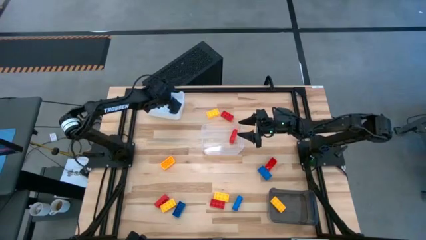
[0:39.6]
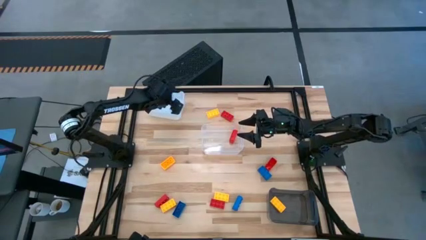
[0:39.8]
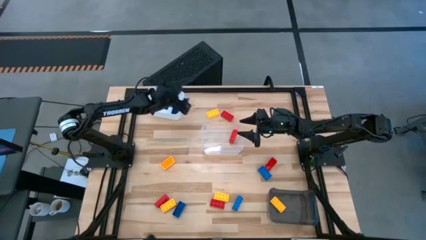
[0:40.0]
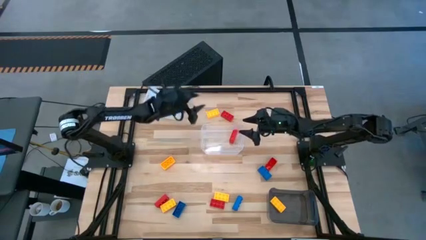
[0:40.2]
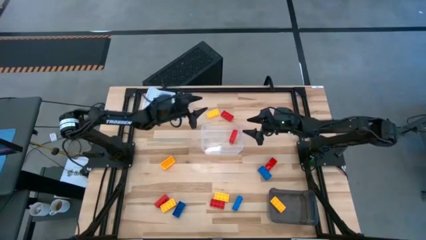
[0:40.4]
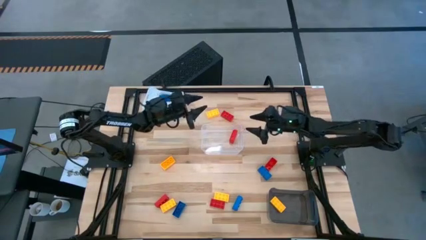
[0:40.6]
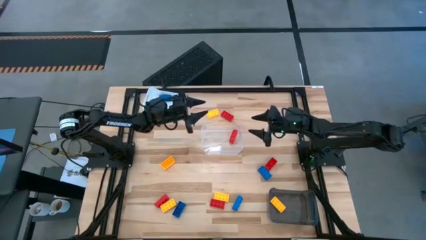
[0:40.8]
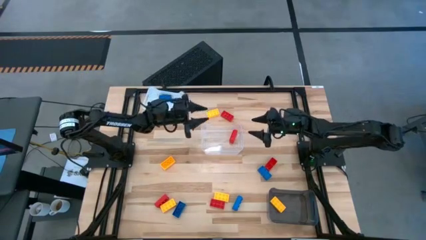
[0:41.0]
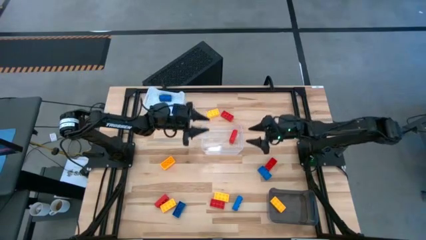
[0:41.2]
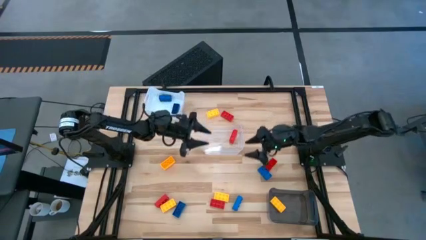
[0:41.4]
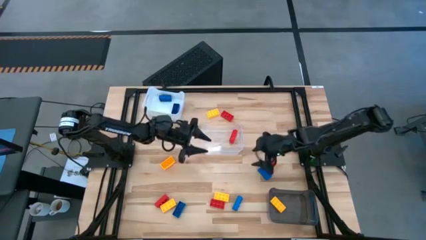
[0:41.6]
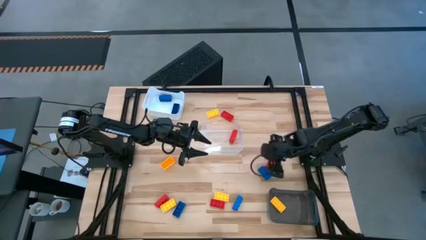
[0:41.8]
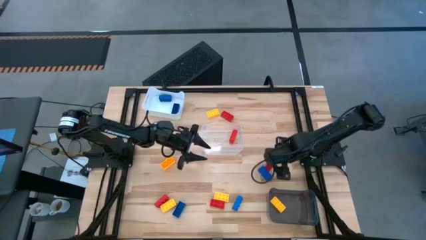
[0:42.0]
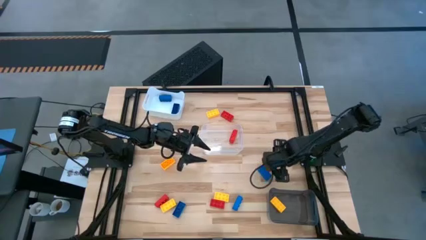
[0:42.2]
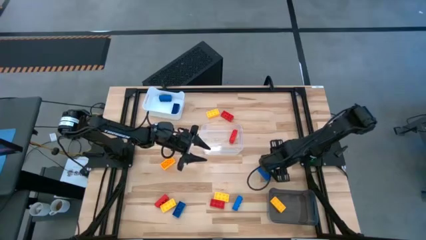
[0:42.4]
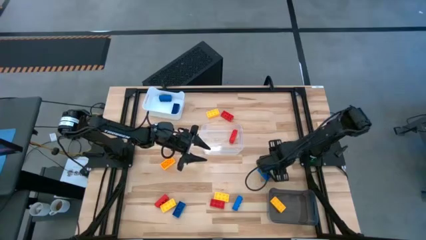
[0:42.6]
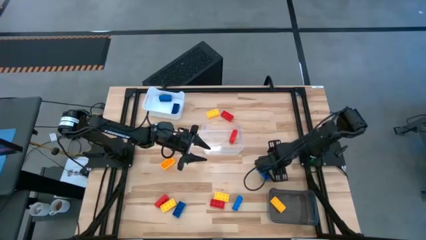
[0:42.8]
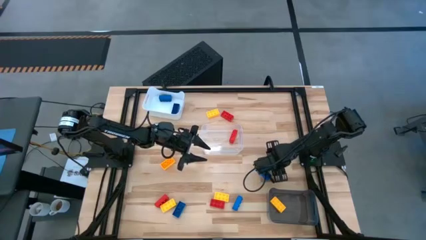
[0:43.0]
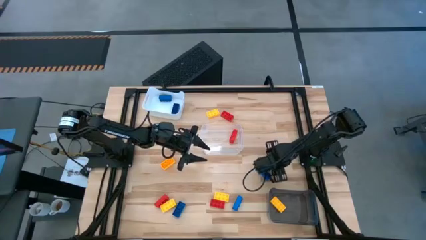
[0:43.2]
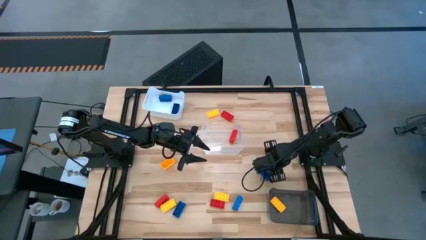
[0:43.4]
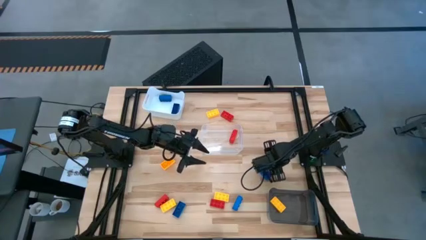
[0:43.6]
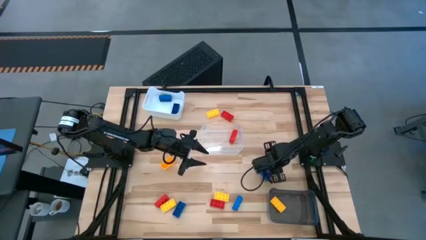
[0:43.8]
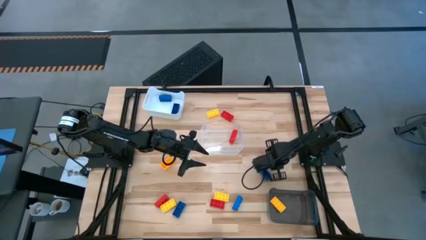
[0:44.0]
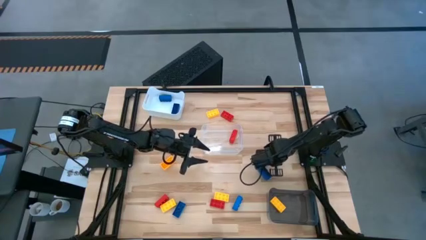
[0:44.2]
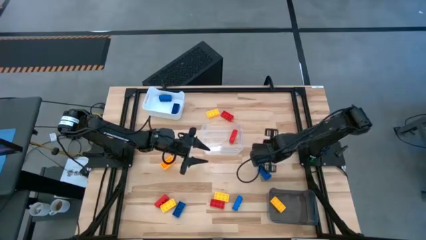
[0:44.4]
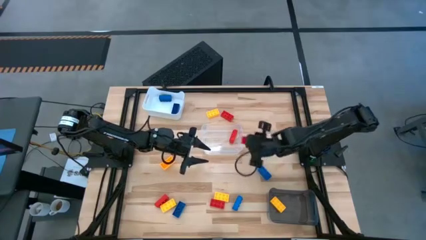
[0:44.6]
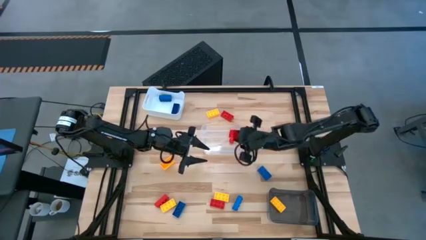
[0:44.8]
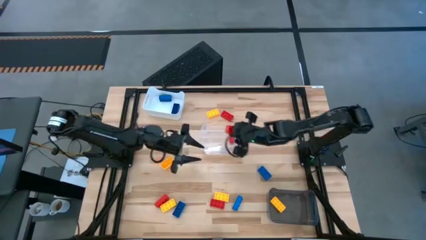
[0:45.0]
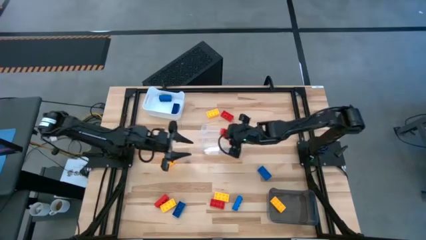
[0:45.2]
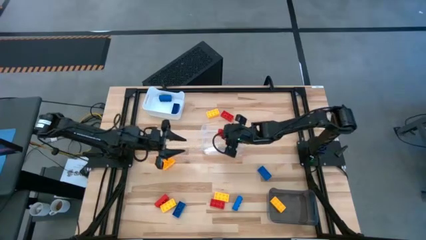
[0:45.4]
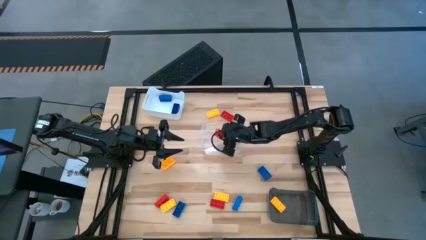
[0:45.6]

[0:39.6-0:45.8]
Task: Sort & place blocks by color
Put the red game piece into the transparent bin

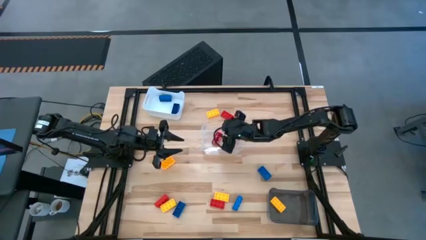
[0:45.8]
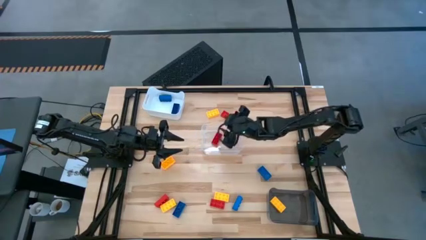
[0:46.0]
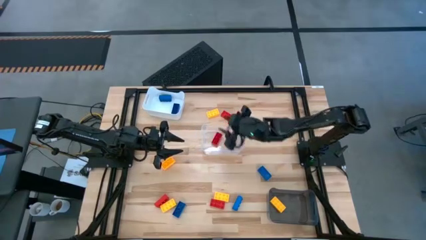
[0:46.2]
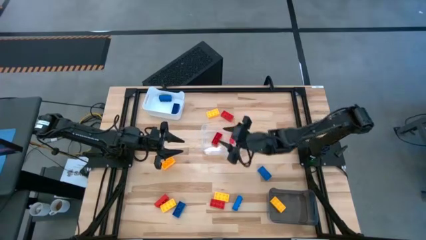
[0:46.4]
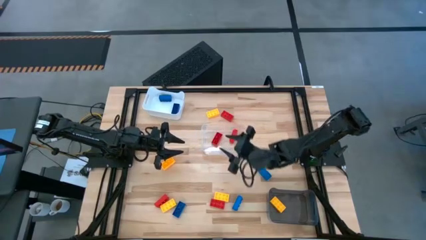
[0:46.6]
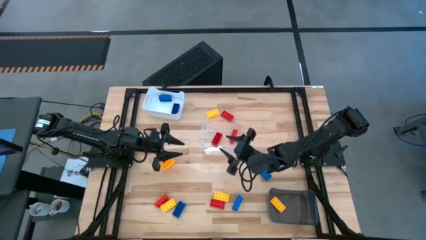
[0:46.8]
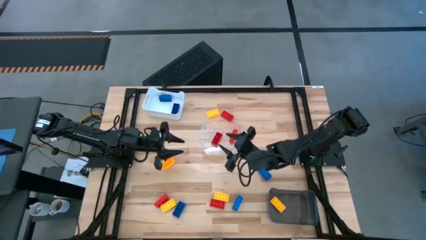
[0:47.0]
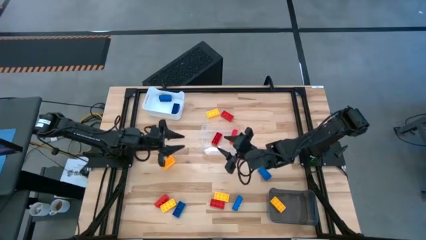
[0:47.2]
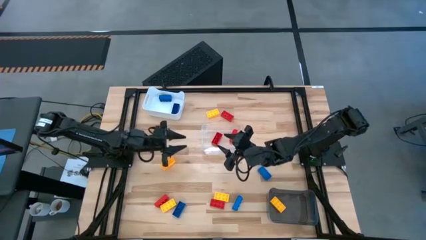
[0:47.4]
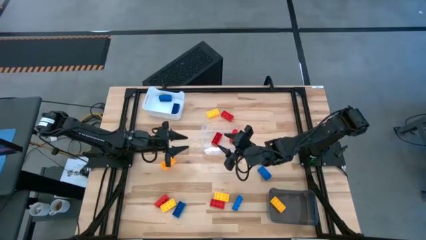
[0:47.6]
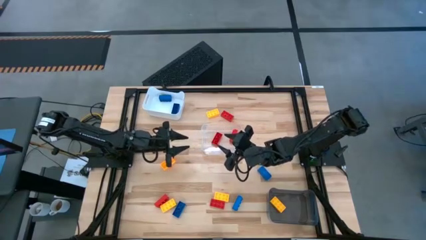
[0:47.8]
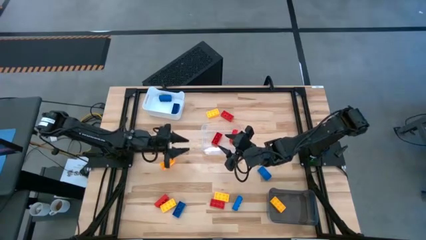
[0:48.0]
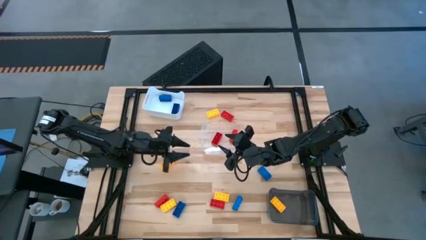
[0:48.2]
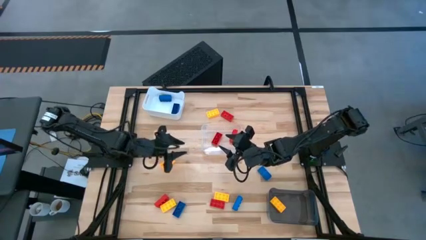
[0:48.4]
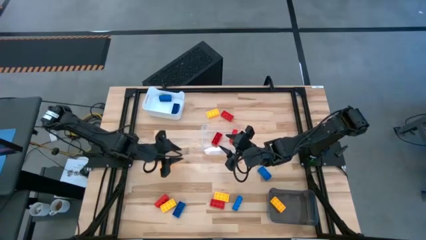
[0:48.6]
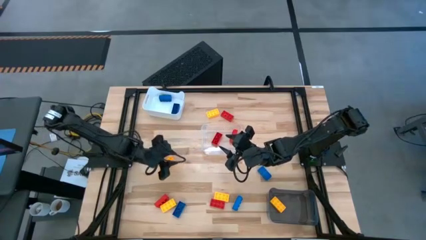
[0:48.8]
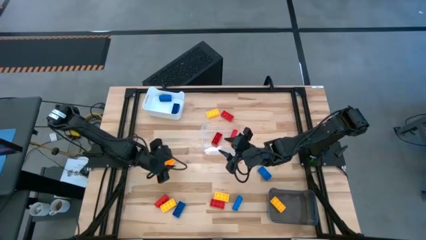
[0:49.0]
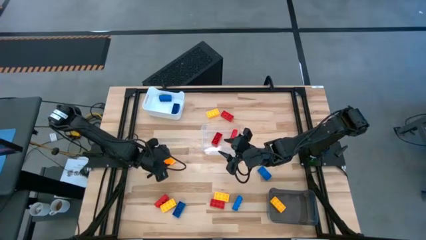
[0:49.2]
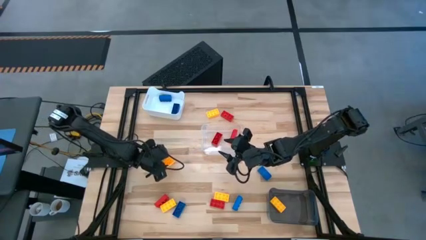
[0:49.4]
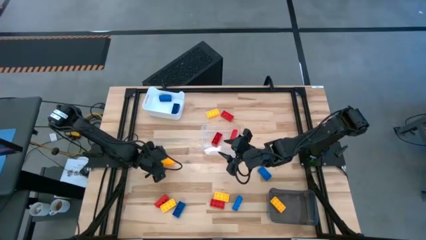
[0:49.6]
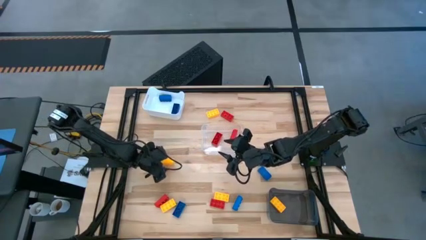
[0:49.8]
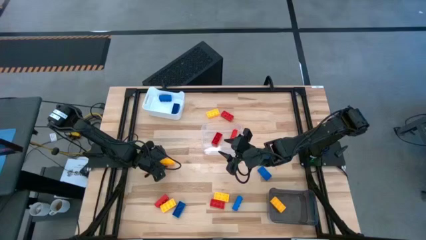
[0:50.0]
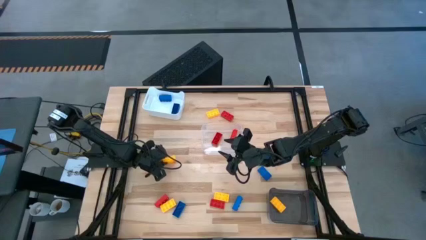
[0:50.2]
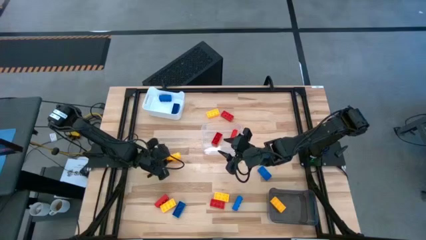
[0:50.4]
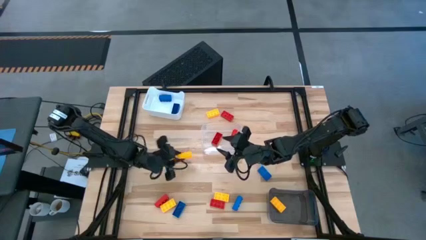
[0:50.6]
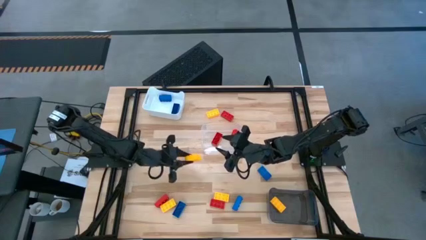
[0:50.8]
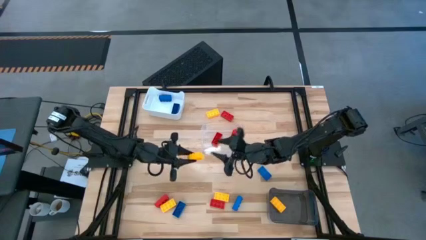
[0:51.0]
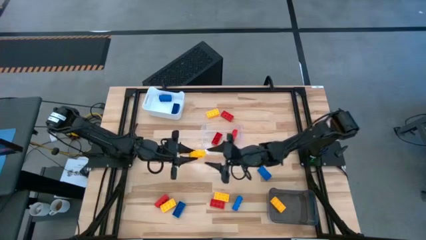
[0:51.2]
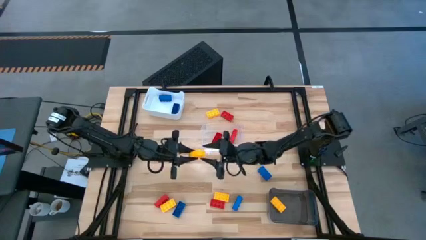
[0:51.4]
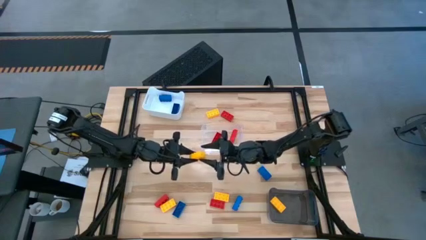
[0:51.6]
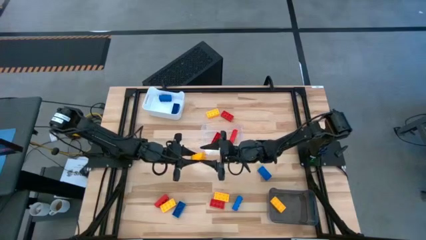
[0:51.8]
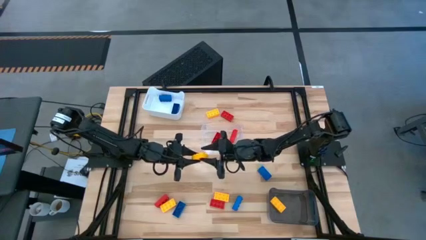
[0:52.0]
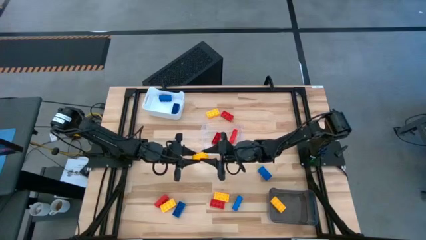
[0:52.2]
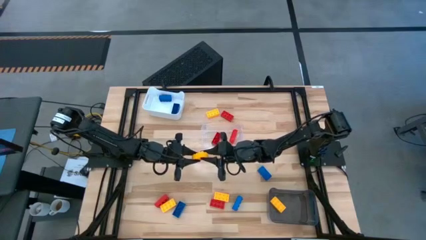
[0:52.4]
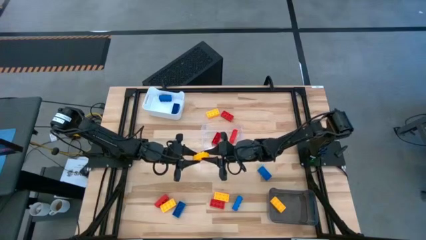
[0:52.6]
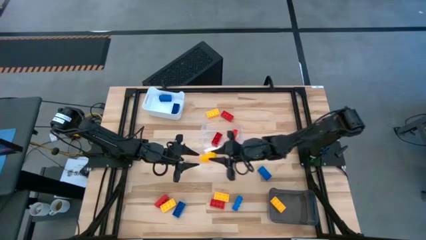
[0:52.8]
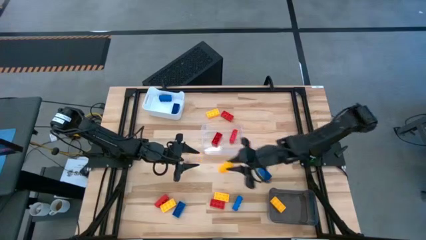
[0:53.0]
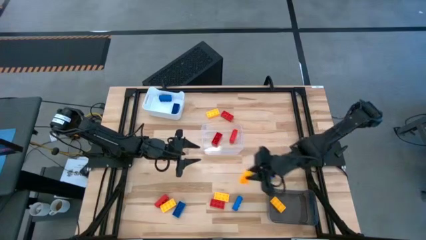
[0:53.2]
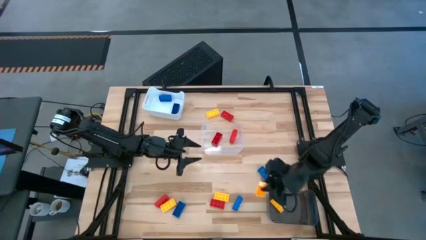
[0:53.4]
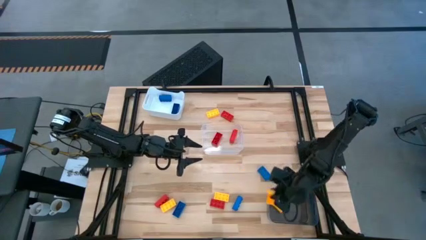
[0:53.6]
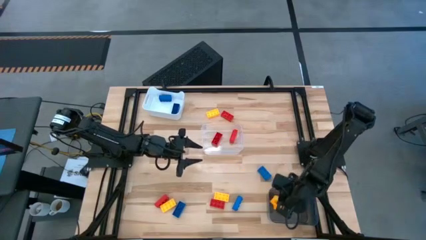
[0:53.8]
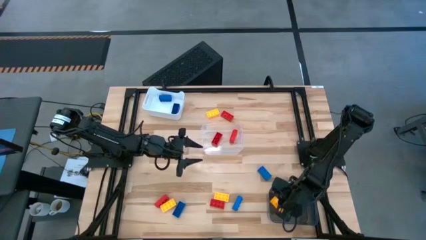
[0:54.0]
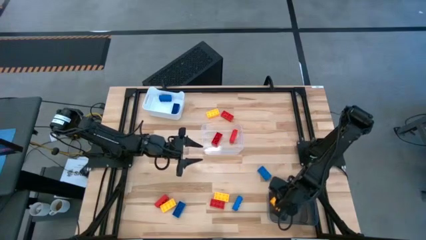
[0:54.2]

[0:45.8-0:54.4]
Put the yellow game piece into the black bin
